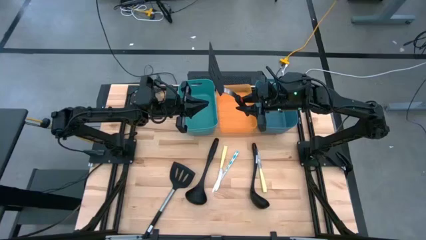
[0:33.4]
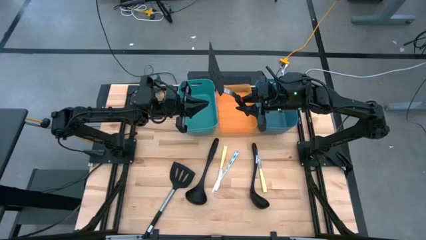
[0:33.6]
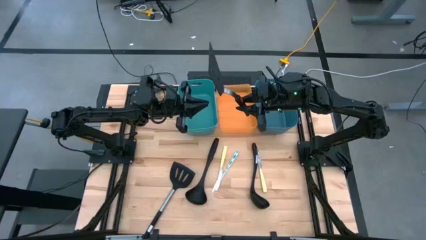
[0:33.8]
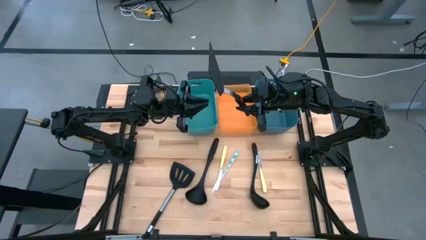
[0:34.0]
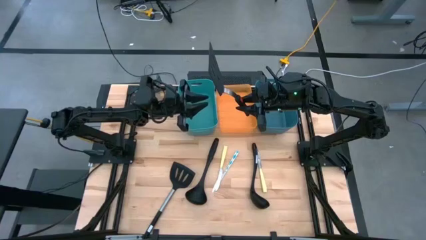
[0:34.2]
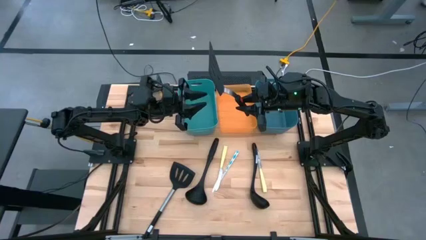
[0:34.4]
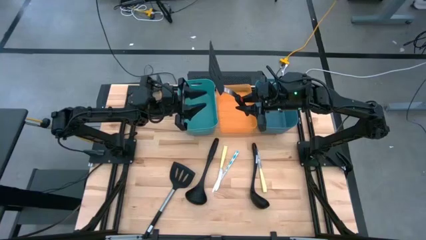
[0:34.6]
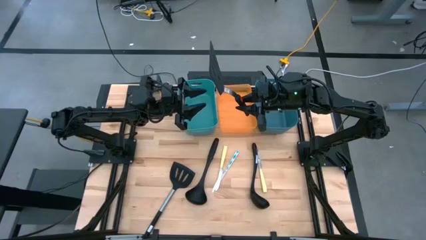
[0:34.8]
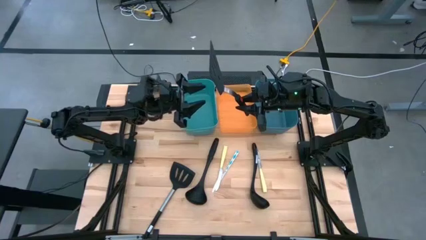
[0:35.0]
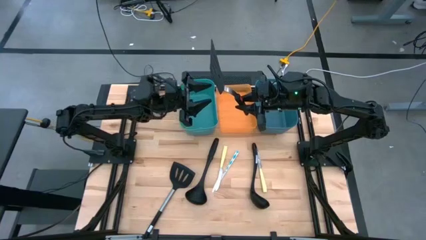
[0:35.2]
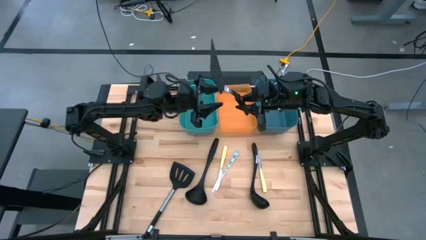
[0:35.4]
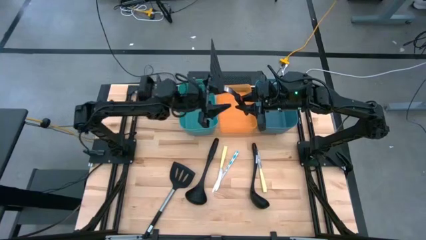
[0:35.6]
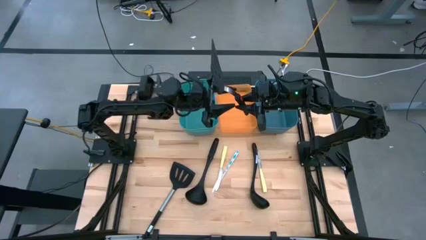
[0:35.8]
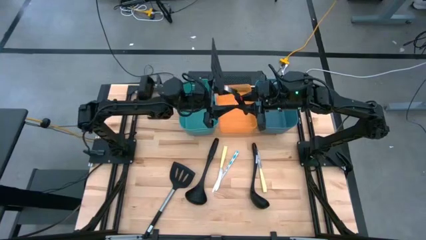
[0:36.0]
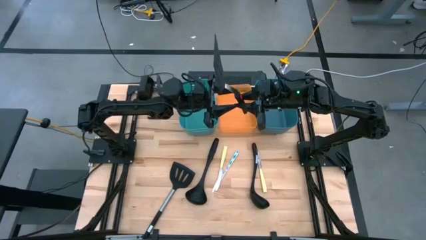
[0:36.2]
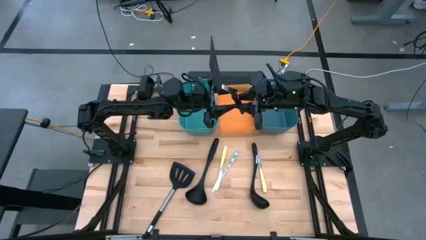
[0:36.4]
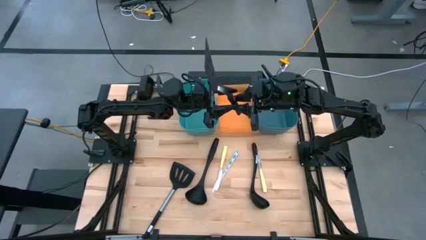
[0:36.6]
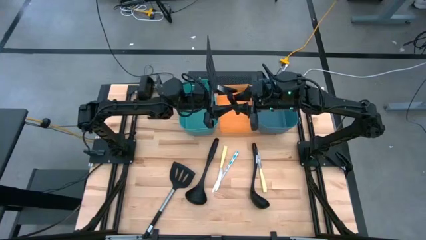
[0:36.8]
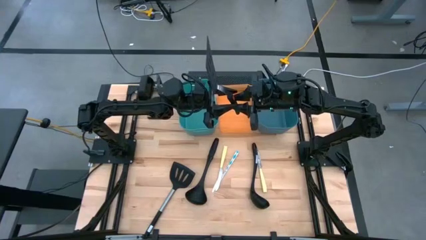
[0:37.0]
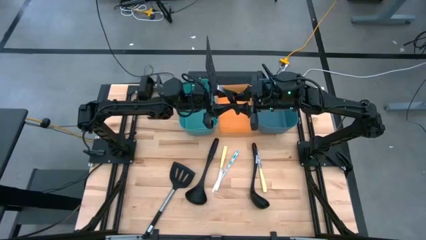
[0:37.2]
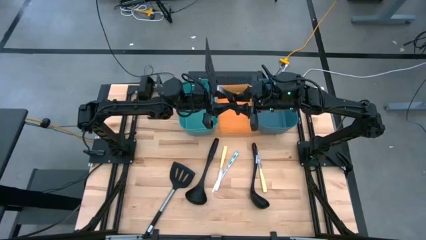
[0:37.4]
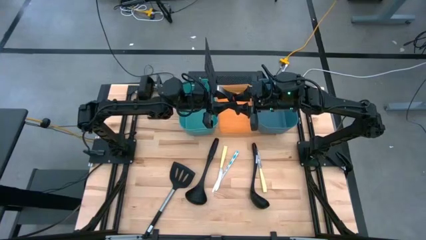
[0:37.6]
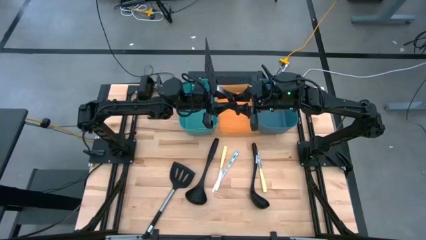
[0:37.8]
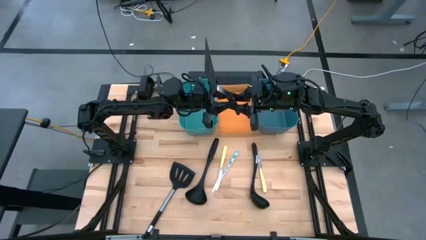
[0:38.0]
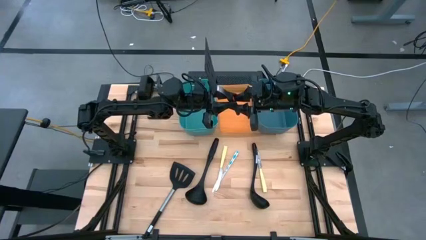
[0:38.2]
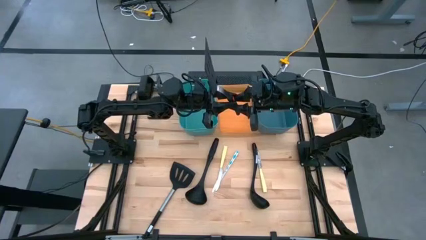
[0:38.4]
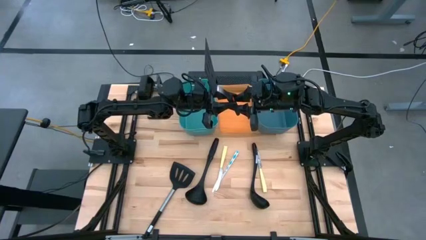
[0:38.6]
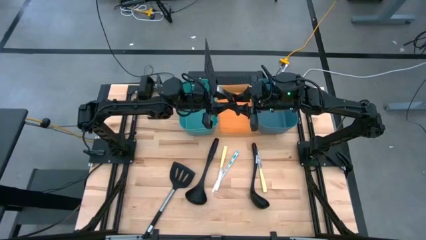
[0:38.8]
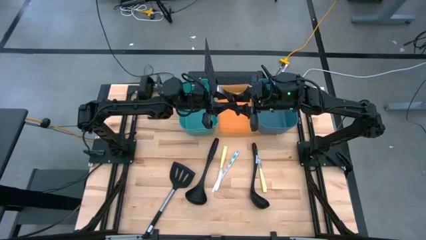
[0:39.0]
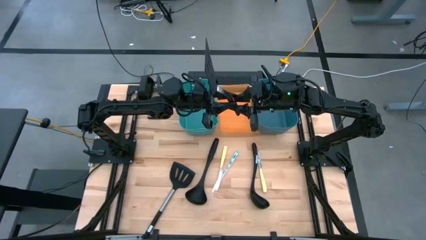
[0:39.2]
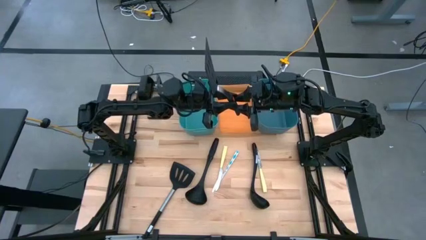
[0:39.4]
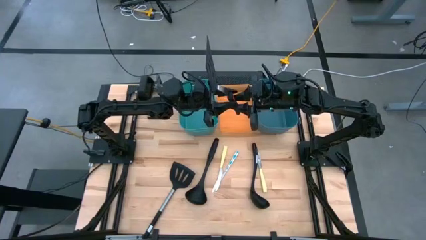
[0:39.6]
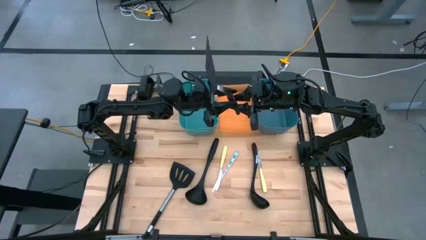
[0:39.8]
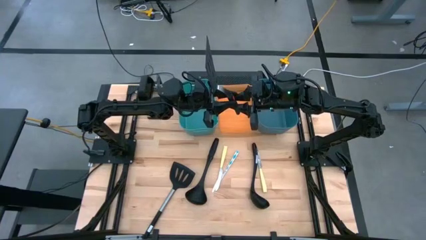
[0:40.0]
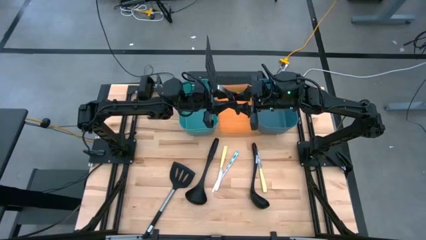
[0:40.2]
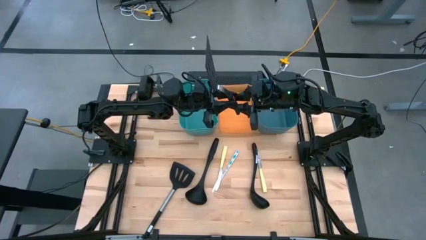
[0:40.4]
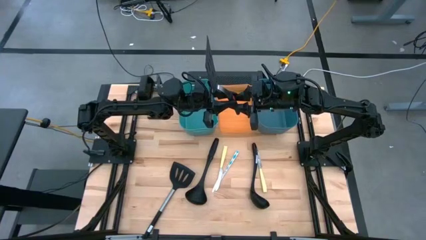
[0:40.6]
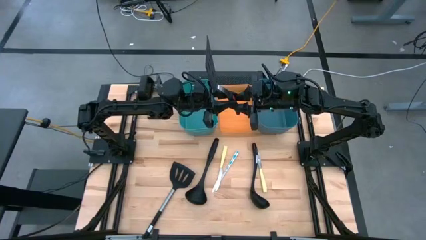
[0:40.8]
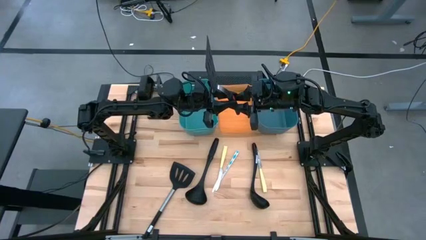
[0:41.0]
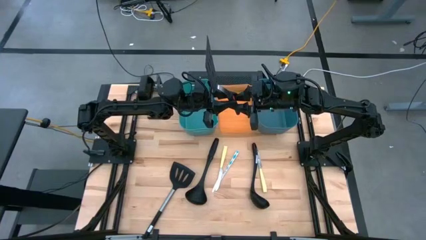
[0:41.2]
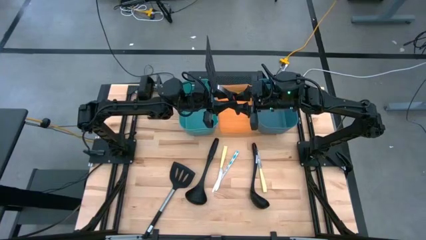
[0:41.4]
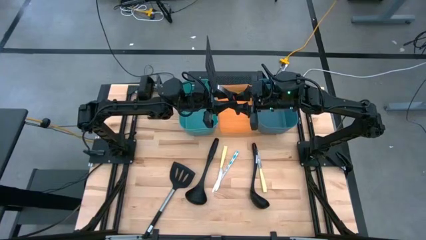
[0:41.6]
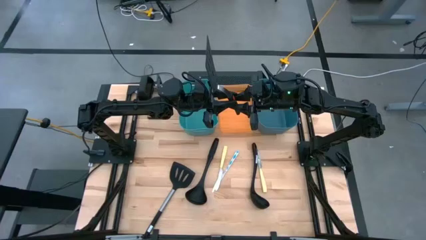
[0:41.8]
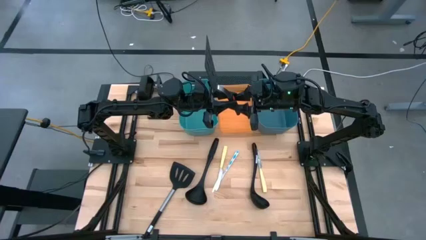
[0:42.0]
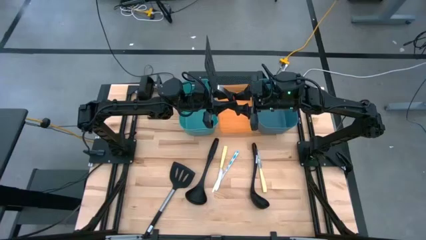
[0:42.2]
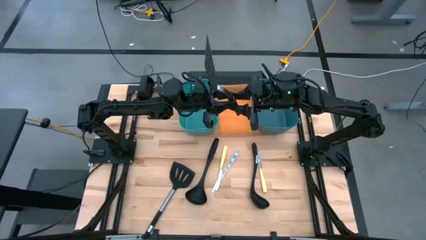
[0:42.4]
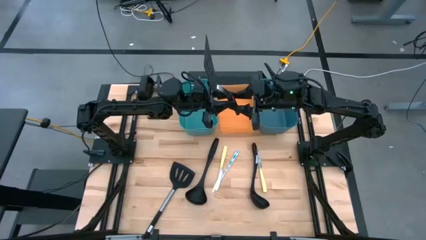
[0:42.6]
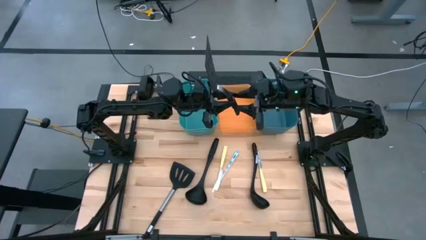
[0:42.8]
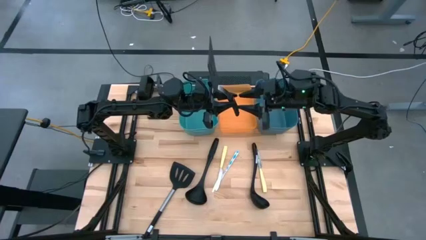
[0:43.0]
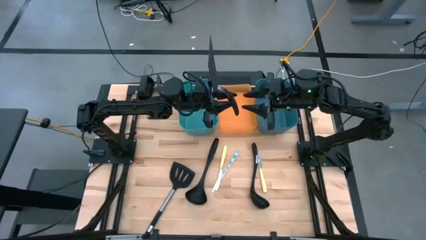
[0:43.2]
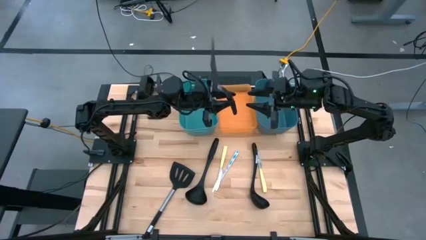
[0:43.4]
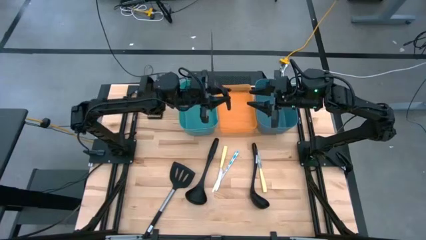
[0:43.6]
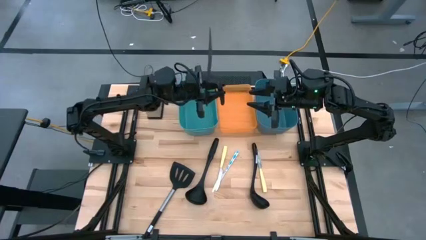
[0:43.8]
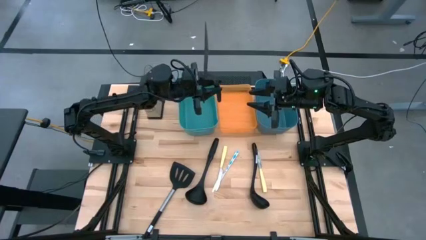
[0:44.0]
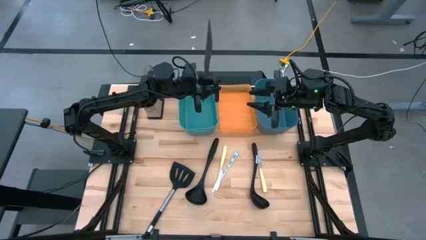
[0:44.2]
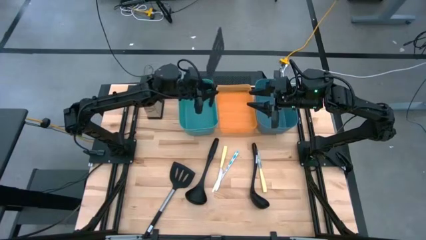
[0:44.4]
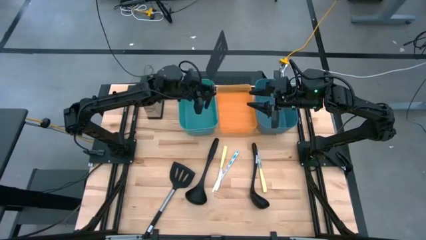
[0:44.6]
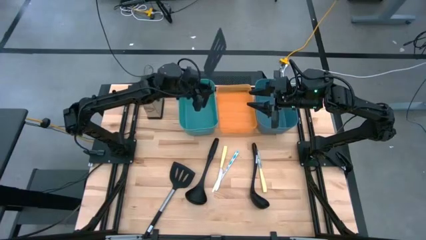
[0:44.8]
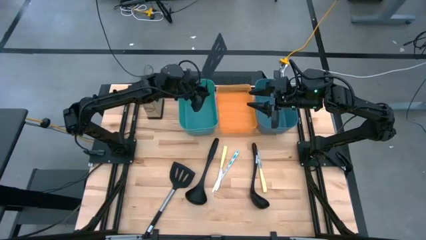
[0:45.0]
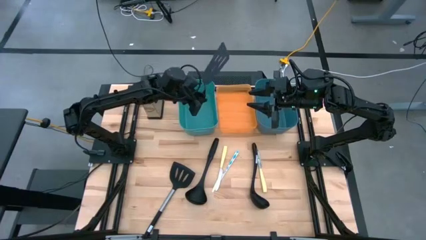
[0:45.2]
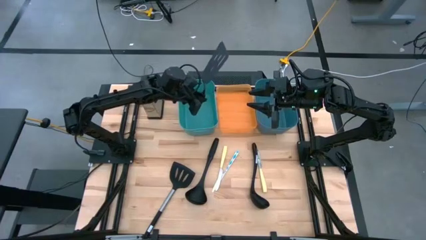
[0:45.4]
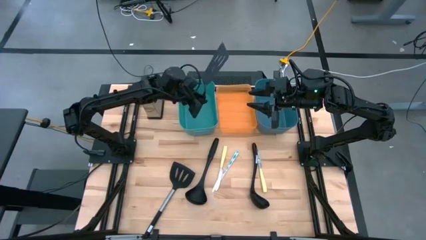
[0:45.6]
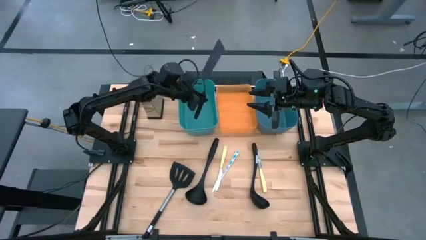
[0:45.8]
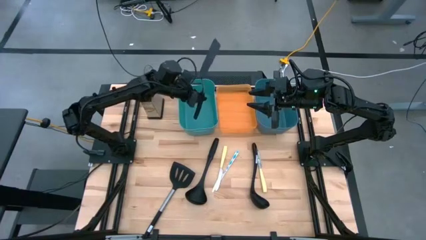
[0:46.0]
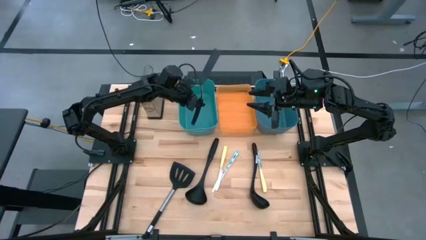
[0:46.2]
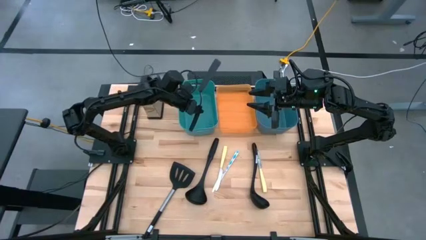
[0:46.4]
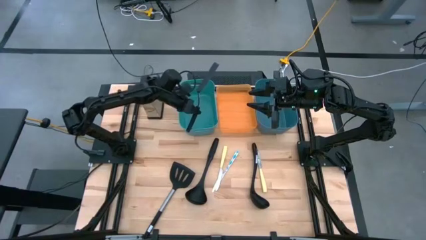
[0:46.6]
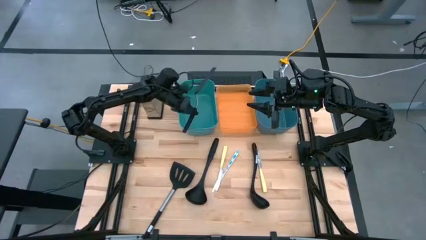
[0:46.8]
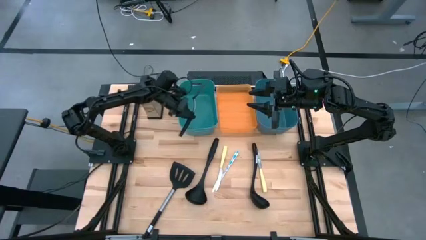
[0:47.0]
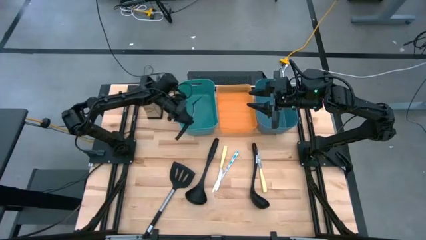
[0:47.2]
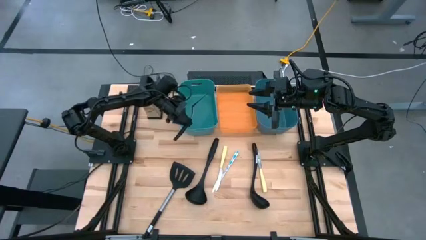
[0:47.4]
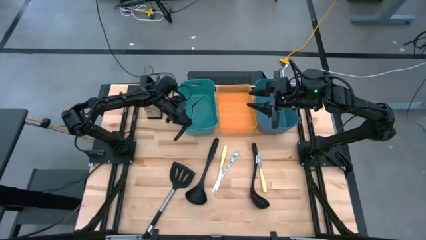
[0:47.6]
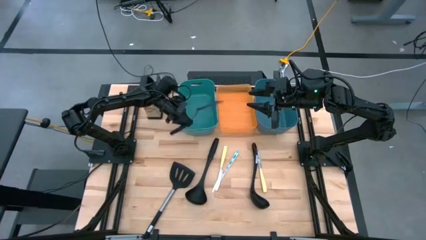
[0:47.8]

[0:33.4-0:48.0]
Task: Pick & Place Kitchen Items
Put the right black spatula into the green bin
